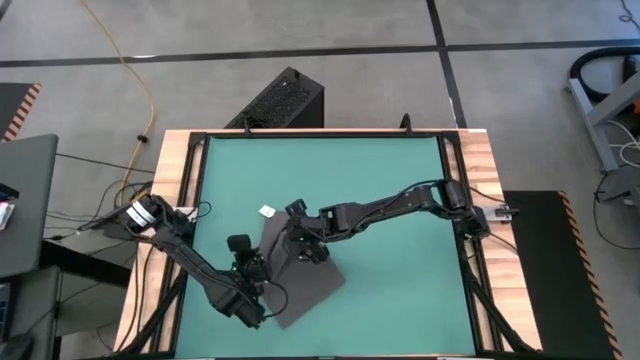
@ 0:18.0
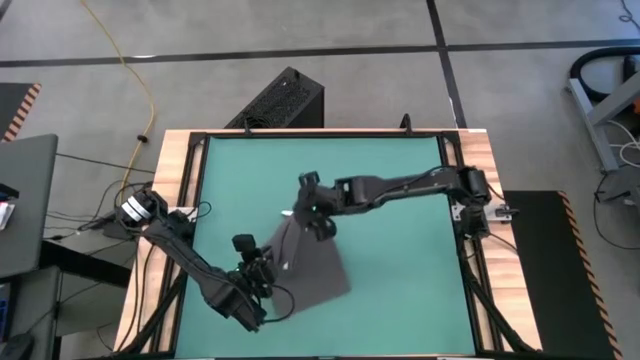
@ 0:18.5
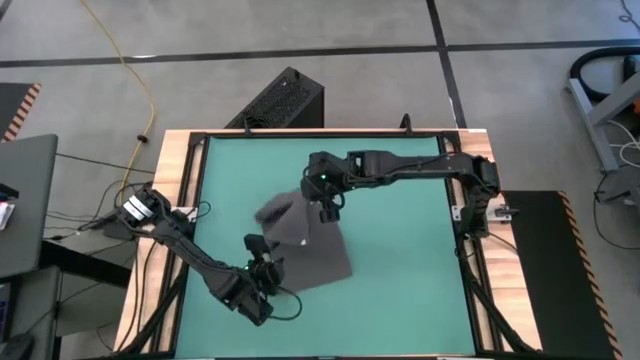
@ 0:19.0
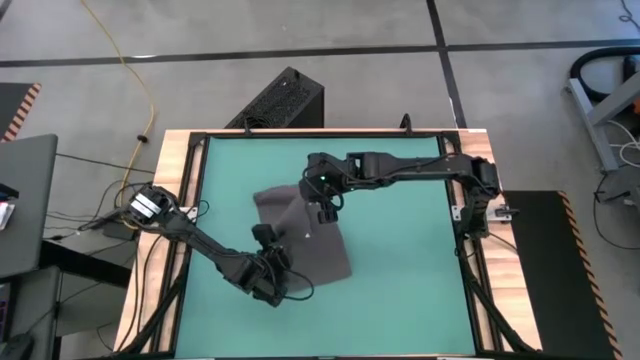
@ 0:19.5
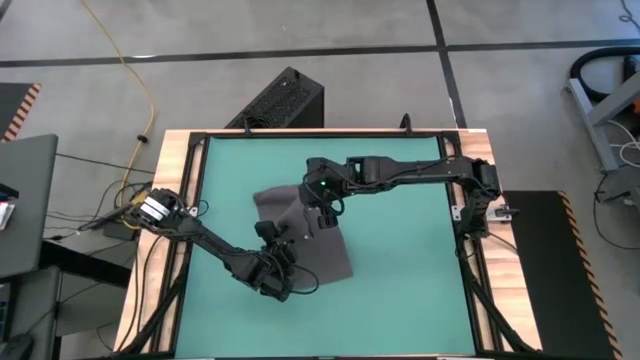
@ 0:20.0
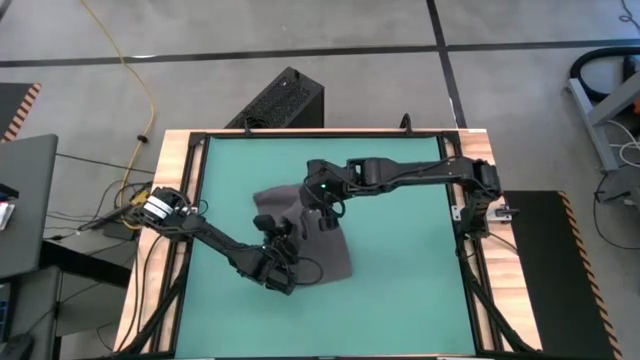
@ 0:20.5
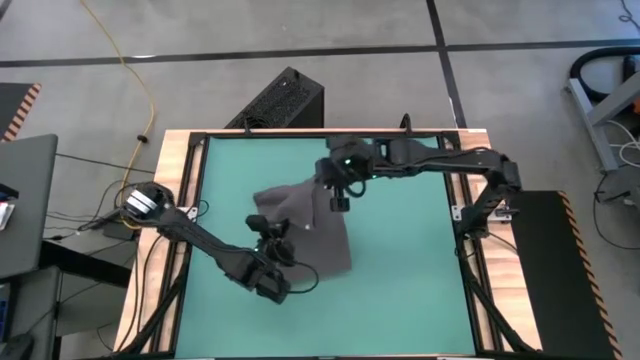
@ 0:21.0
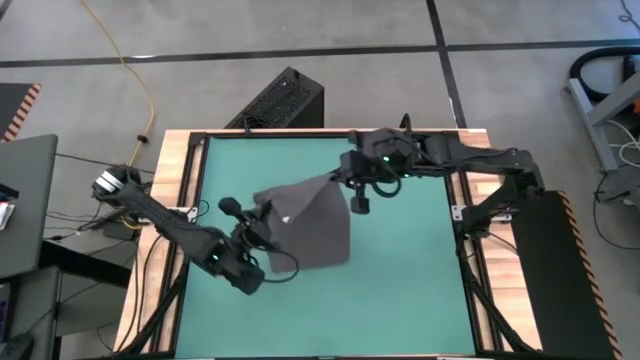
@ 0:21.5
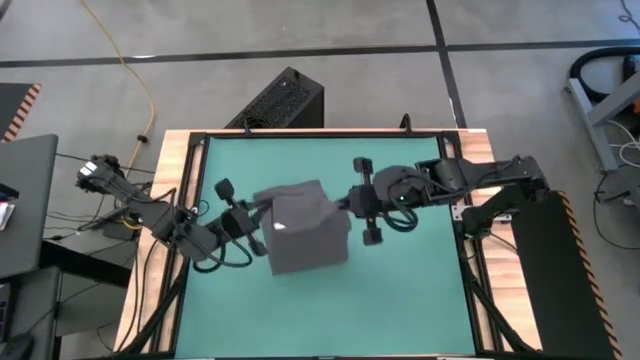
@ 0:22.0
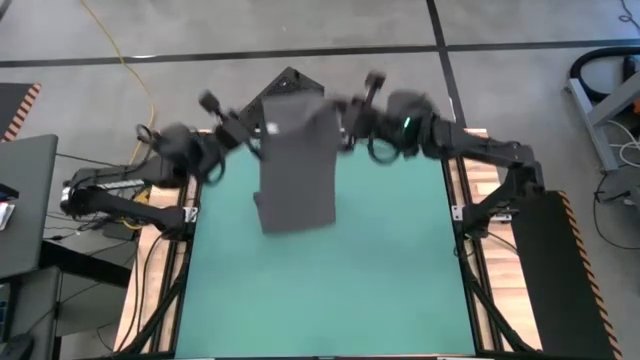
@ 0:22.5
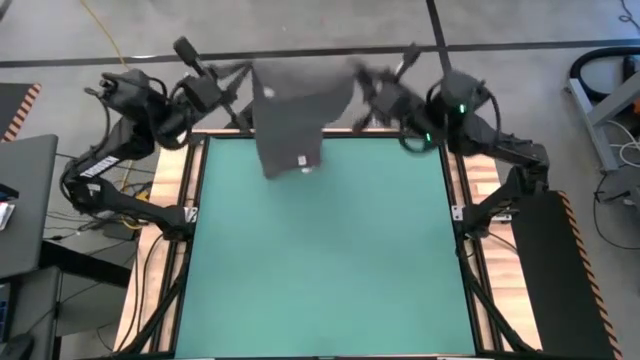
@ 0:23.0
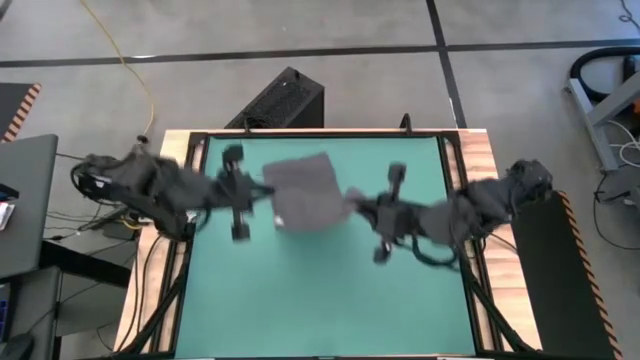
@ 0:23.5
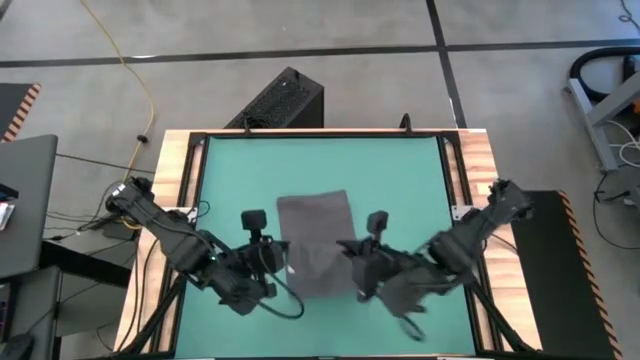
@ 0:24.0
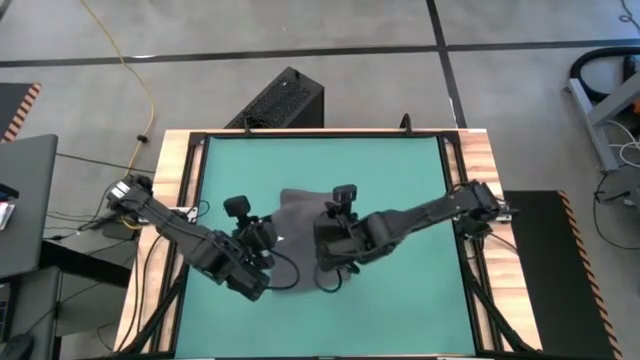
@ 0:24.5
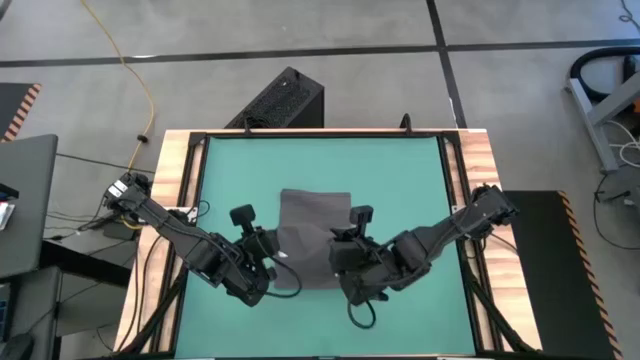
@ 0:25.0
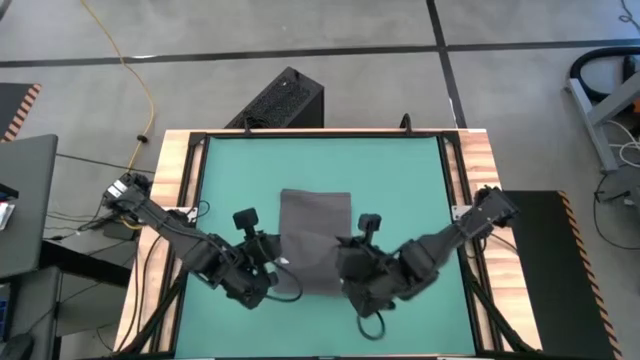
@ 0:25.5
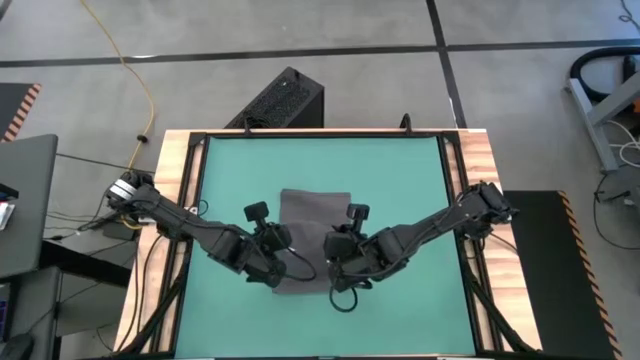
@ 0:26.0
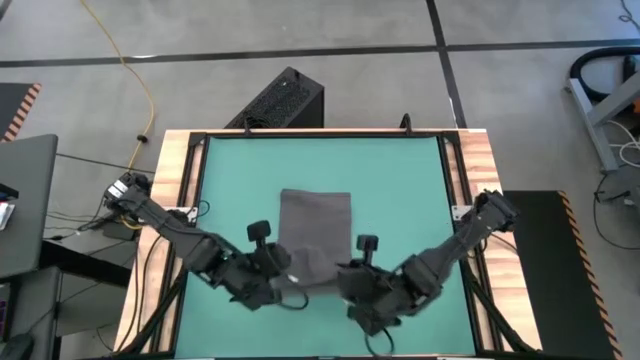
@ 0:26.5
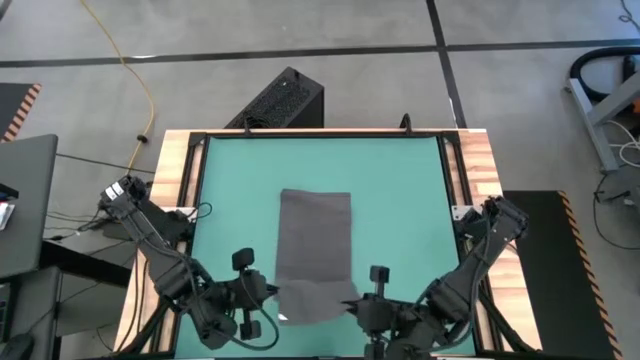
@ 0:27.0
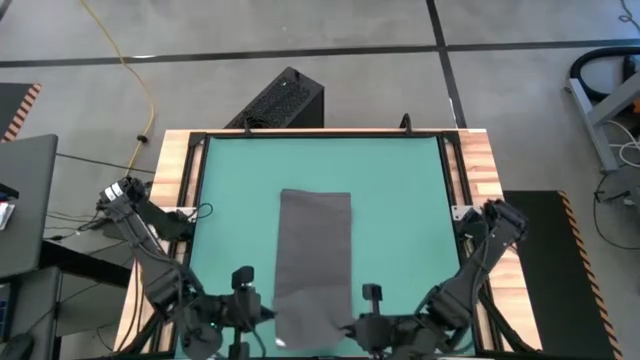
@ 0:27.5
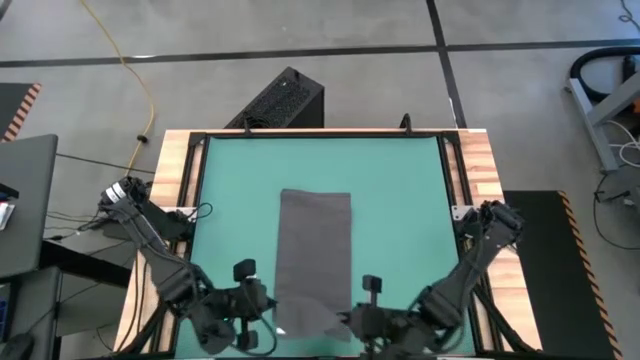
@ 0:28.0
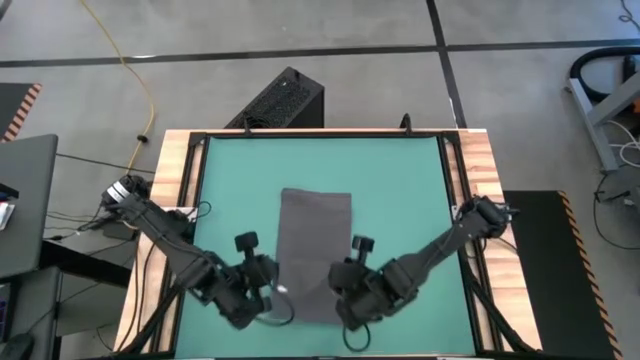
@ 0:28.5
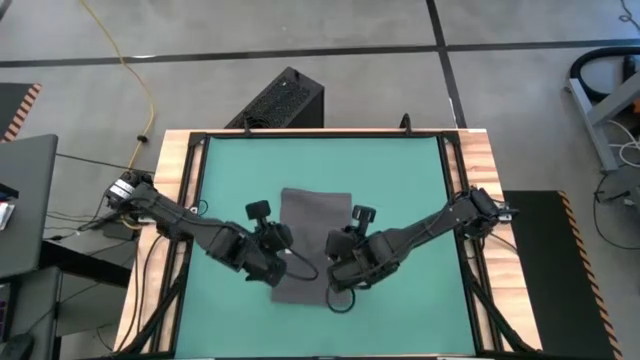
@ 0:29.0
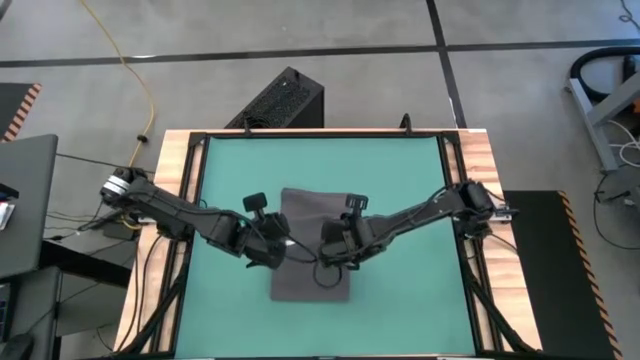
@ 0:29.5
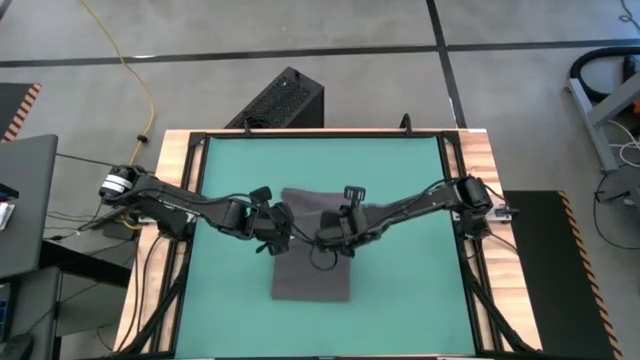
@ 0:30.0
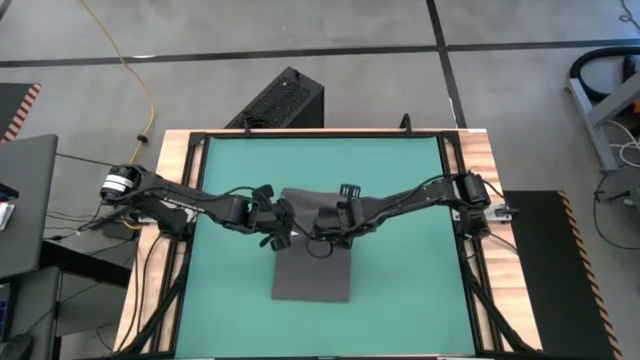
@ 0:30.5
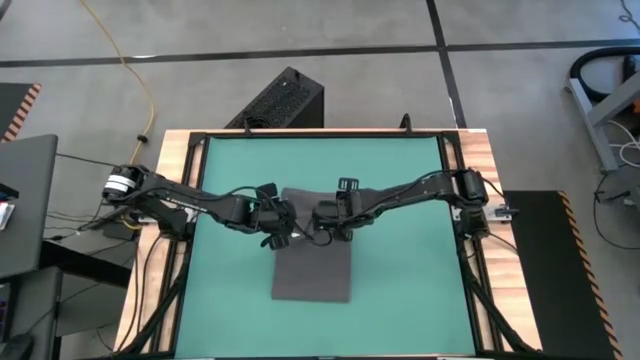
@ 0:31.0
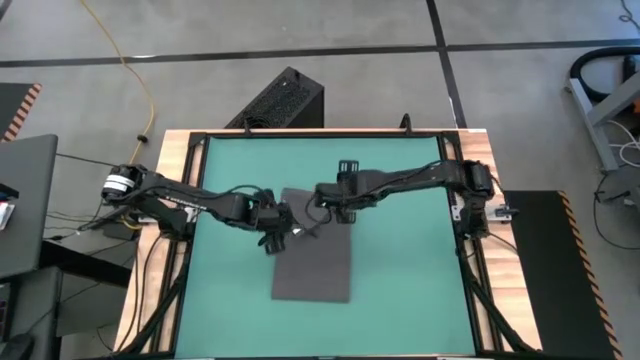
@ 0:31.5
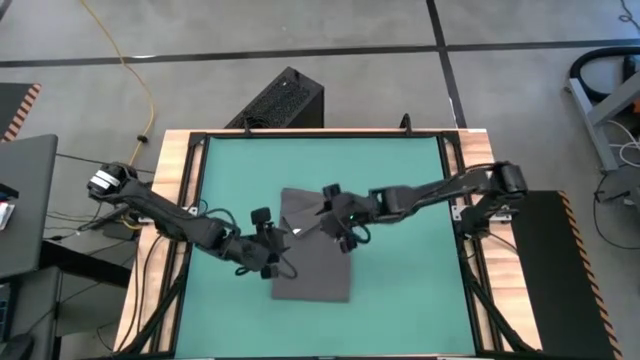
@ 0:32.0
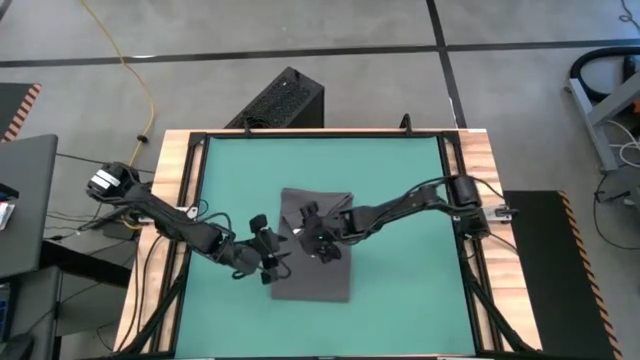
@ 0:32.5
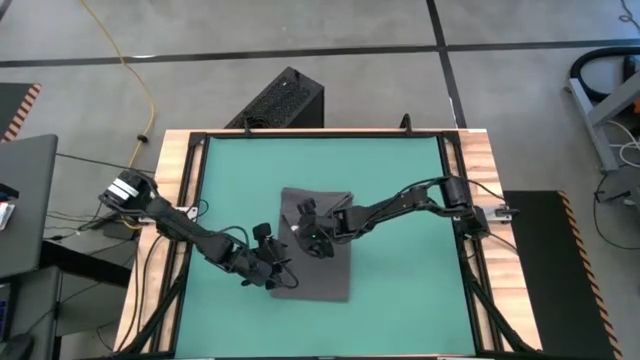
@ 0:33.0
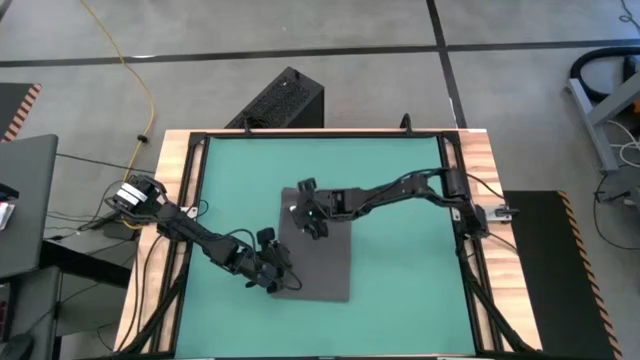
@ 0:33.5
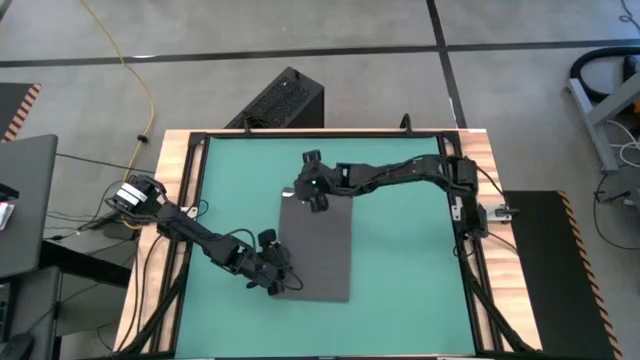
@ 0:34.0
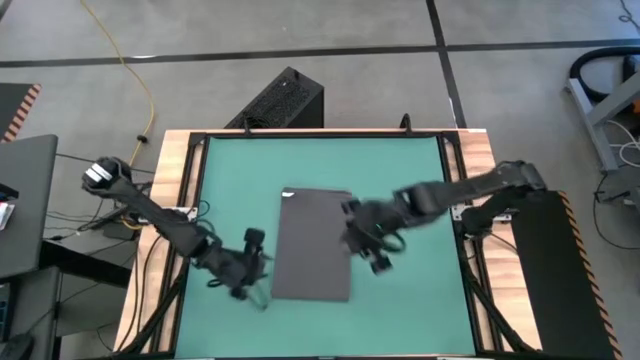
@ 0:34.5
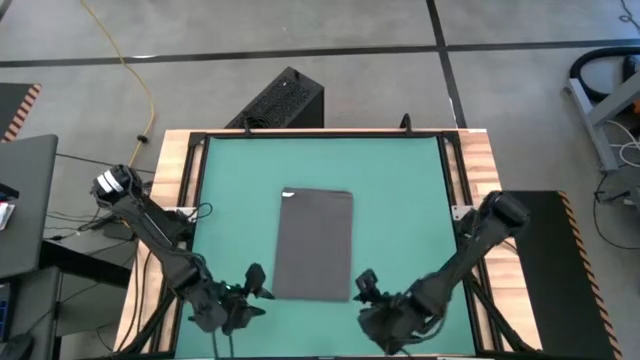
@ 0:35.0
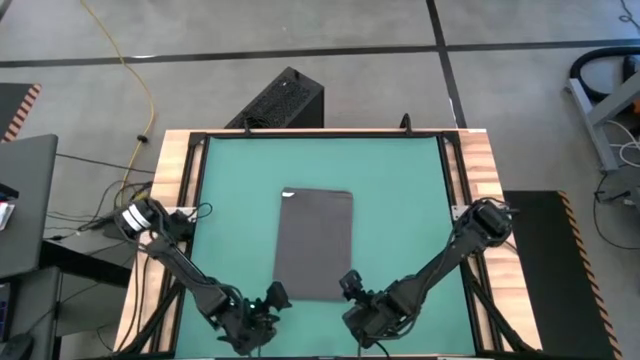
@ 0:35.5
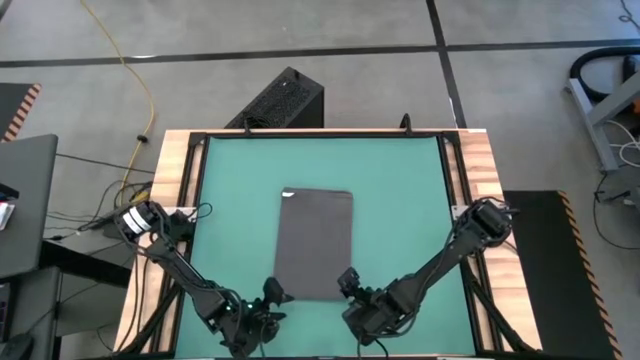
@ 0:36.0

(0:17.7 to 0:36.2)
Task: Roll towel into tight, uniform cylinder
Roll the gray towel
